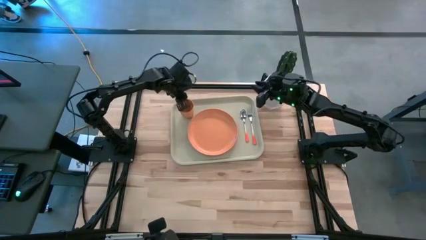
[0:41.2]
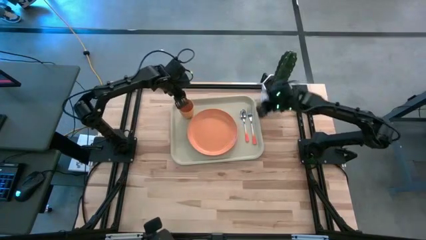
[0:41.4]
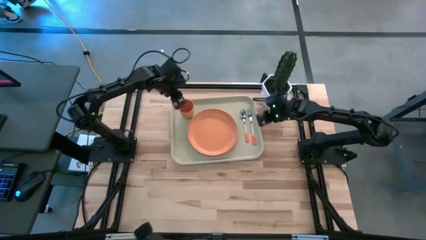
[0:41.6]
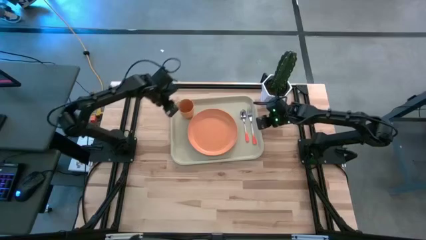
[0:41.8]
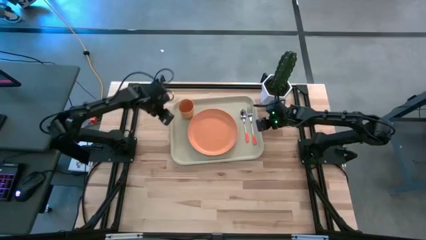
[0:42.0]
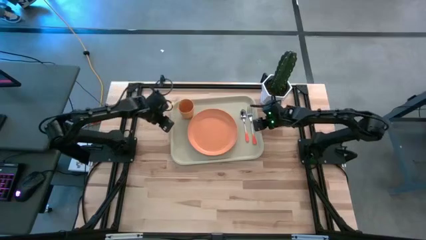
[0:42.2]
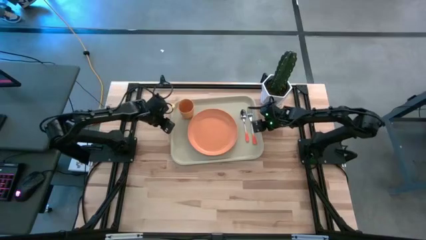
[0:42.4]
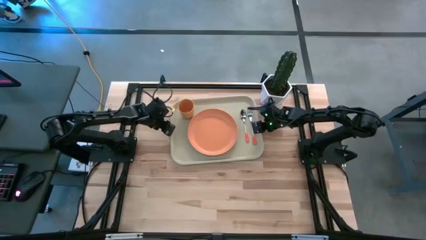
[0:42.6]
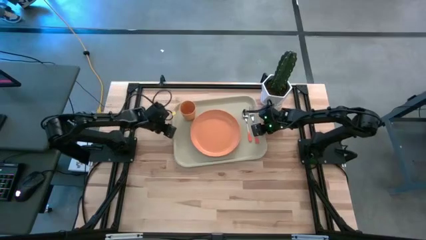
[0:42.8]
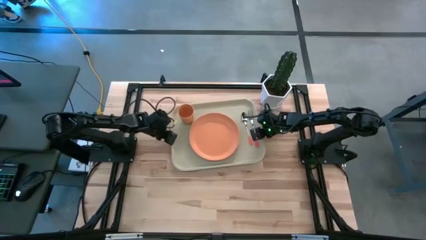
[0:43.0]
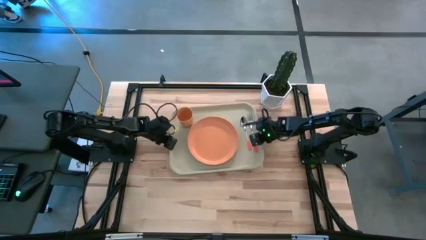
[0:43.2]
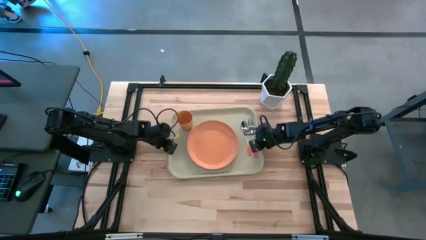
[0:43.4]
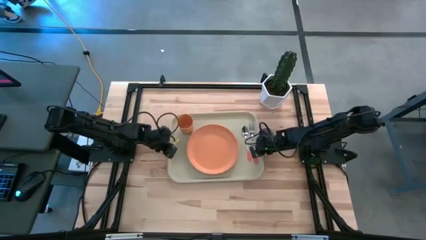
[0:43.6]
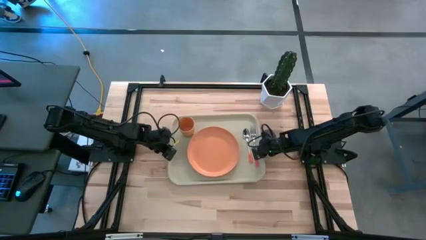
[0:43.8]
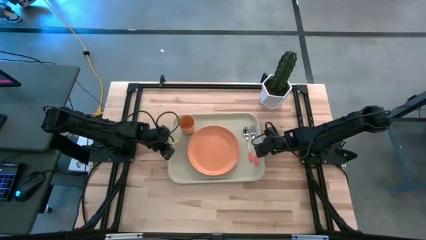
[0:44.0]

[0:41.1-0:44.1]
Task: Pick and place plate/cup/fork/spoon on tray
Adjust the gray tray to the center

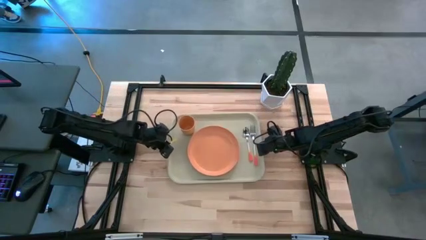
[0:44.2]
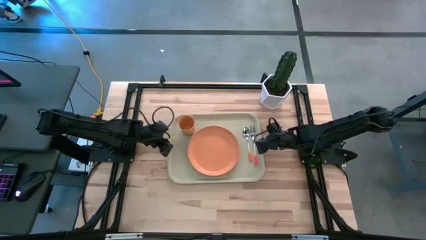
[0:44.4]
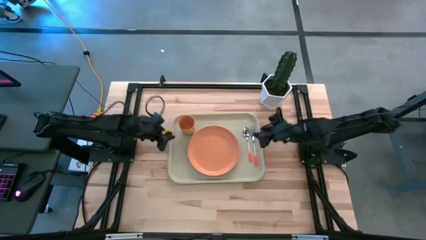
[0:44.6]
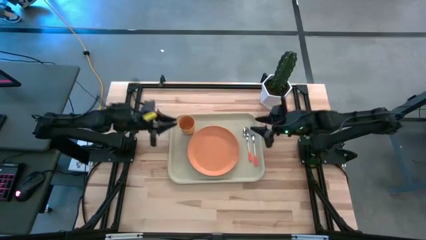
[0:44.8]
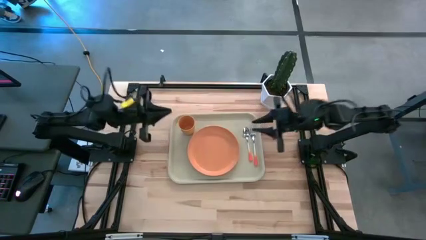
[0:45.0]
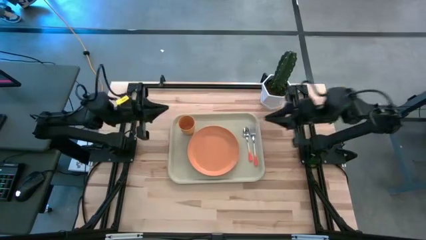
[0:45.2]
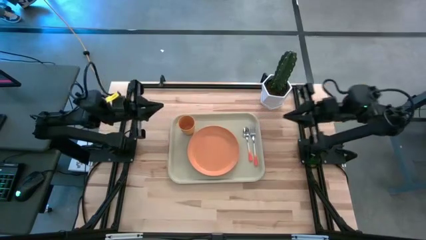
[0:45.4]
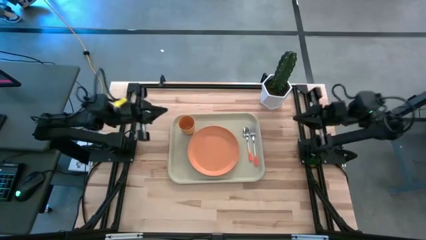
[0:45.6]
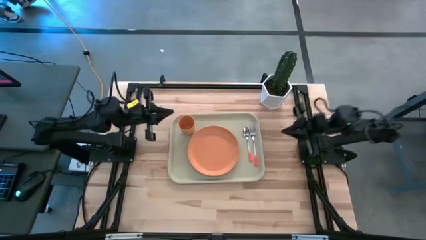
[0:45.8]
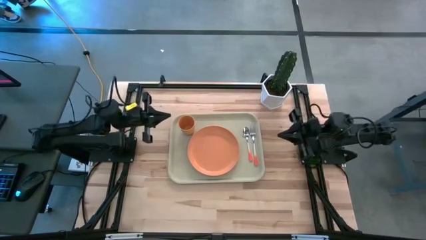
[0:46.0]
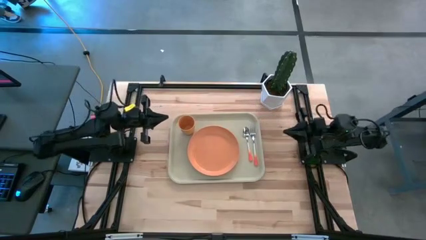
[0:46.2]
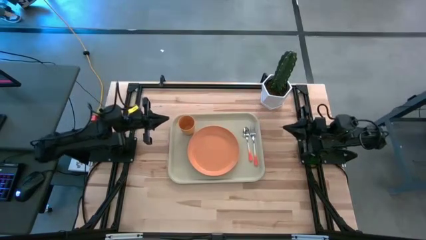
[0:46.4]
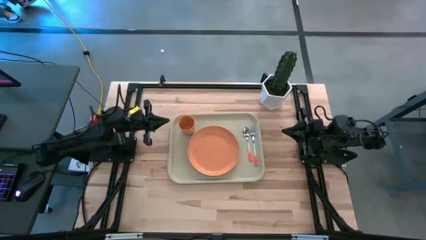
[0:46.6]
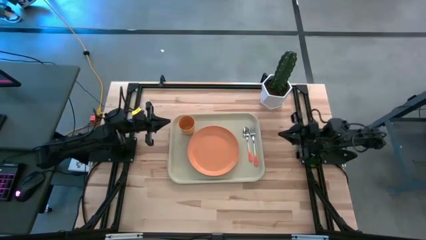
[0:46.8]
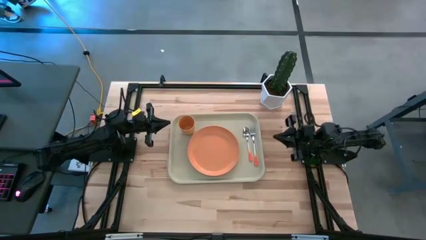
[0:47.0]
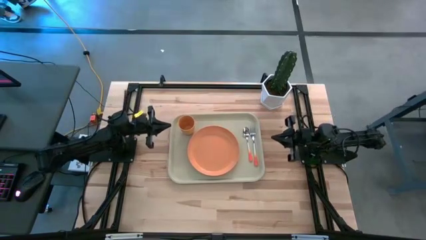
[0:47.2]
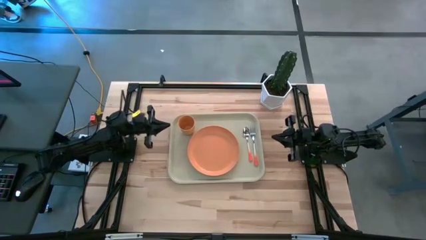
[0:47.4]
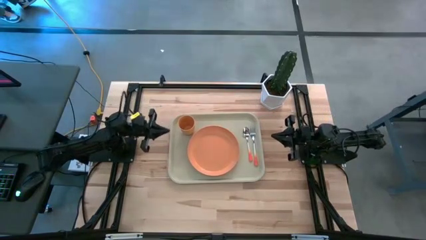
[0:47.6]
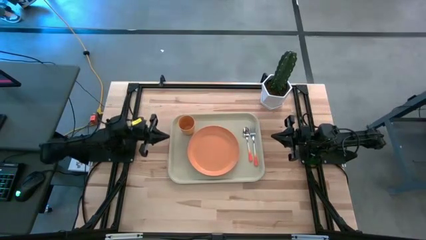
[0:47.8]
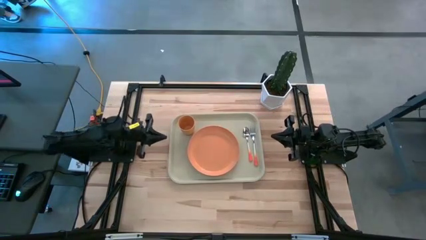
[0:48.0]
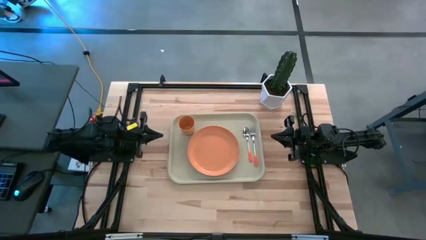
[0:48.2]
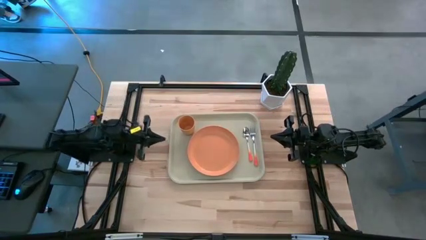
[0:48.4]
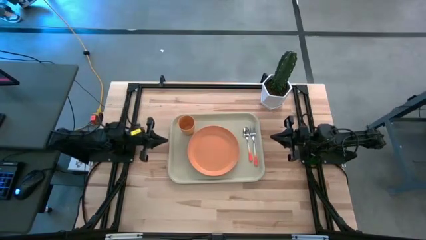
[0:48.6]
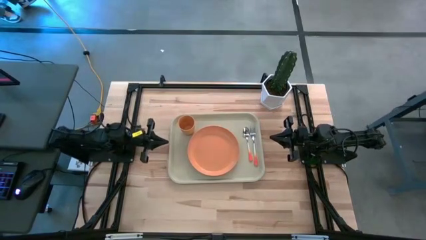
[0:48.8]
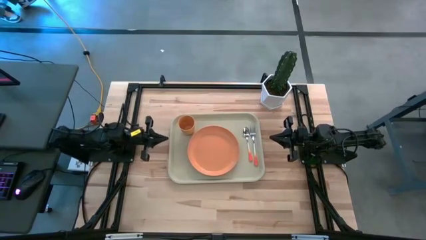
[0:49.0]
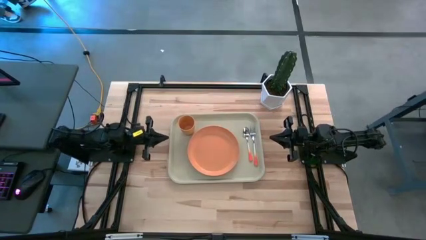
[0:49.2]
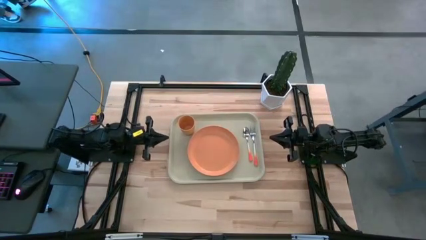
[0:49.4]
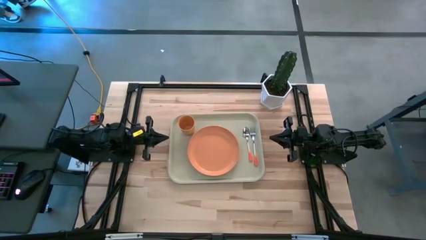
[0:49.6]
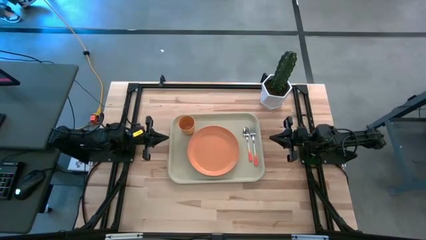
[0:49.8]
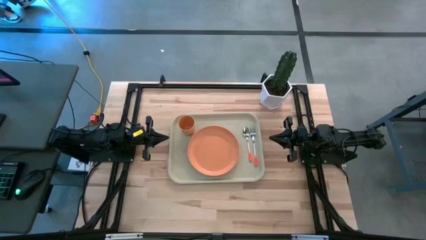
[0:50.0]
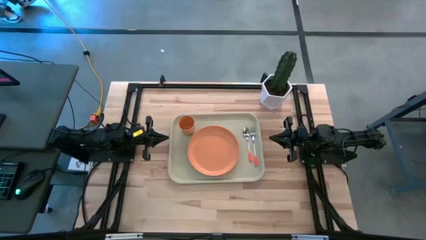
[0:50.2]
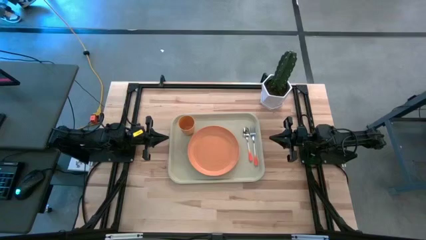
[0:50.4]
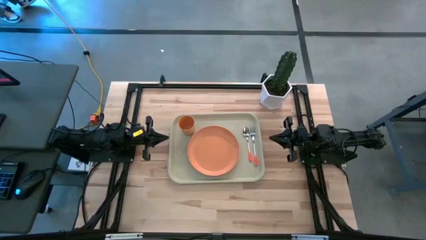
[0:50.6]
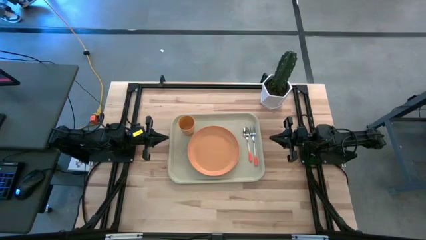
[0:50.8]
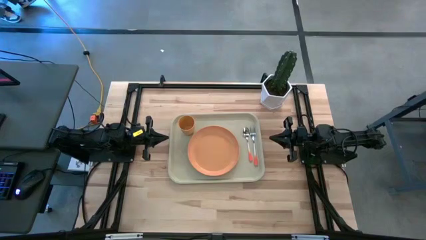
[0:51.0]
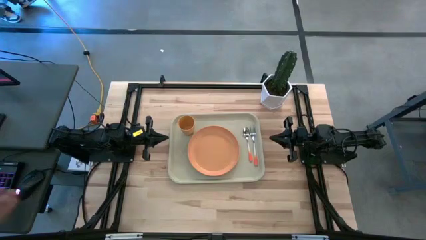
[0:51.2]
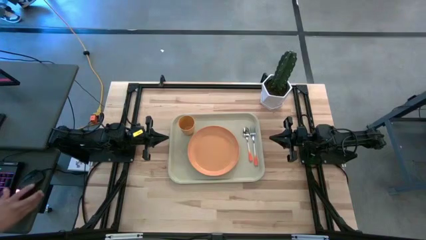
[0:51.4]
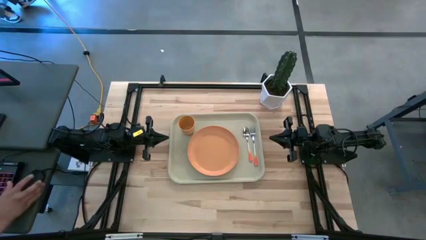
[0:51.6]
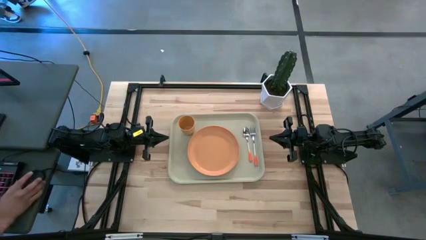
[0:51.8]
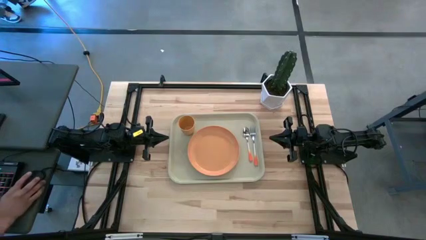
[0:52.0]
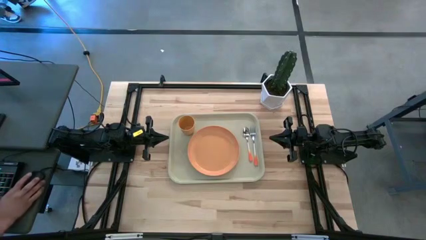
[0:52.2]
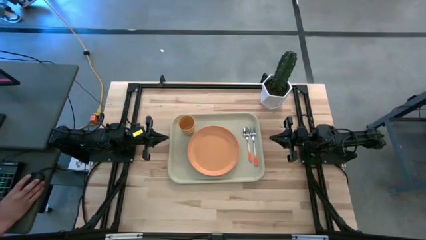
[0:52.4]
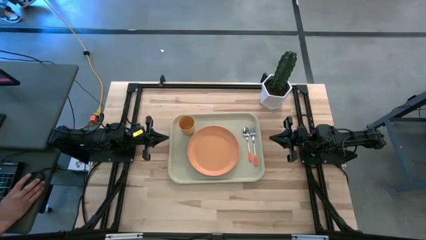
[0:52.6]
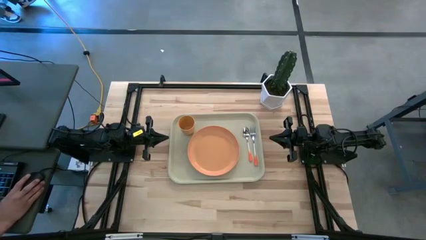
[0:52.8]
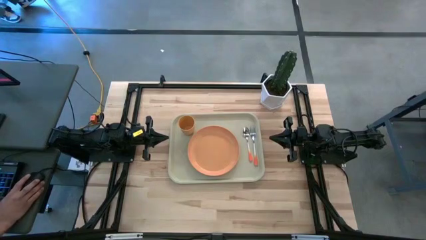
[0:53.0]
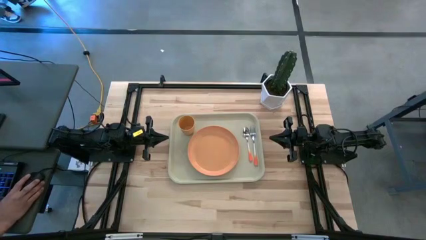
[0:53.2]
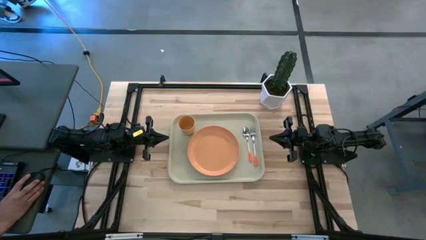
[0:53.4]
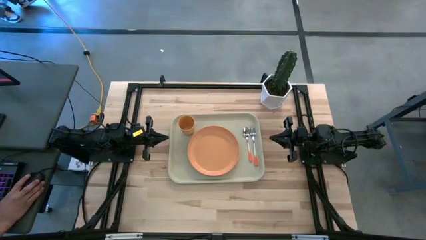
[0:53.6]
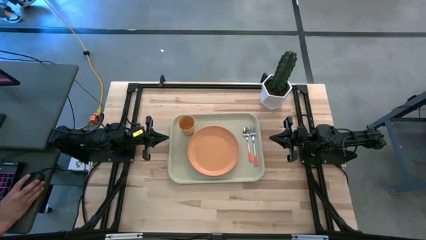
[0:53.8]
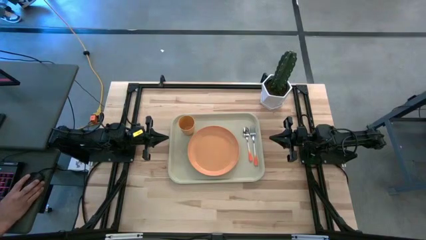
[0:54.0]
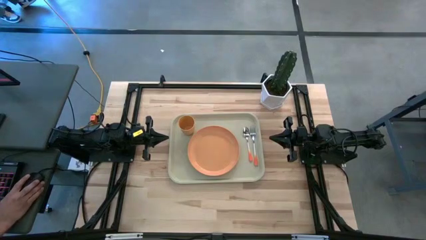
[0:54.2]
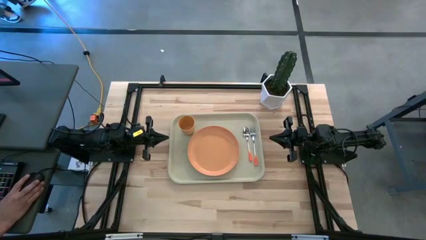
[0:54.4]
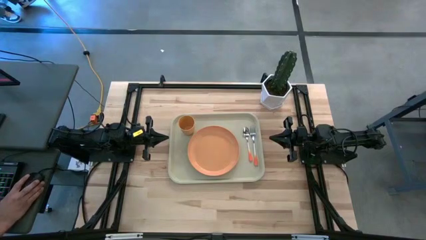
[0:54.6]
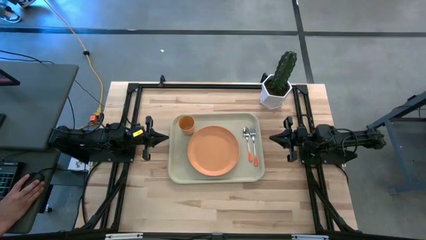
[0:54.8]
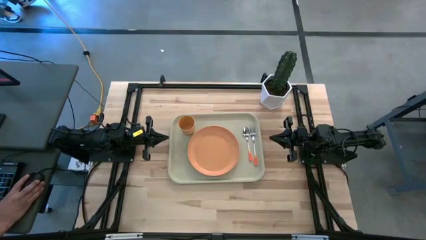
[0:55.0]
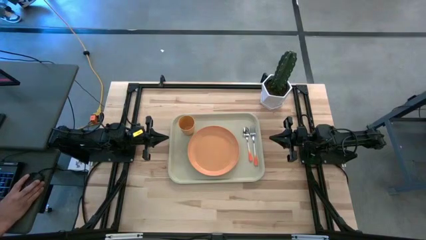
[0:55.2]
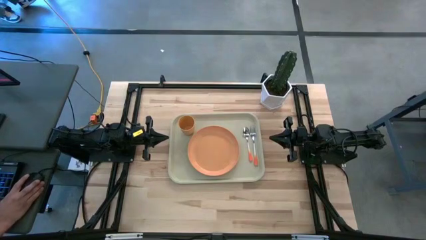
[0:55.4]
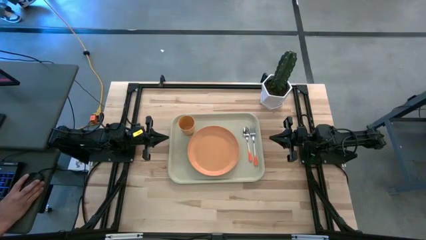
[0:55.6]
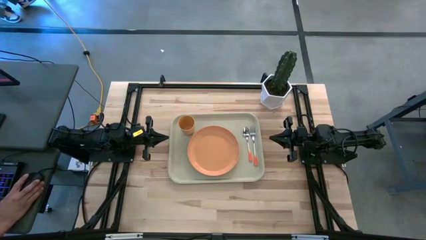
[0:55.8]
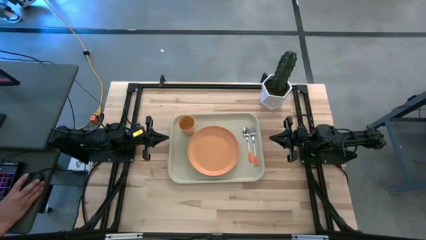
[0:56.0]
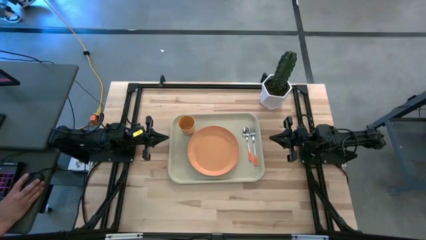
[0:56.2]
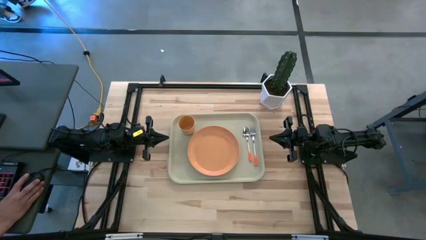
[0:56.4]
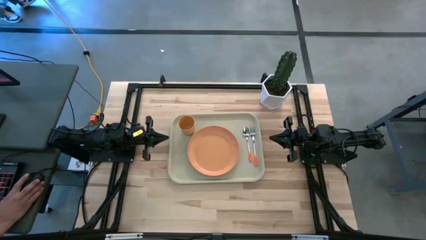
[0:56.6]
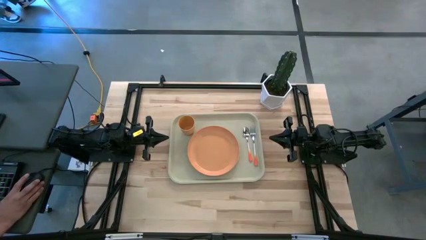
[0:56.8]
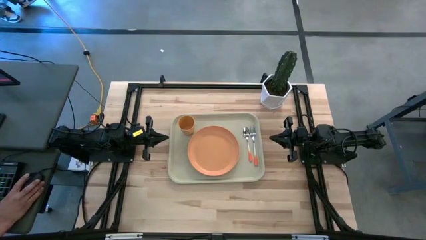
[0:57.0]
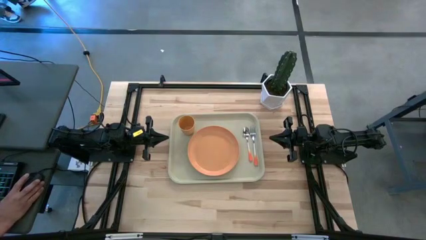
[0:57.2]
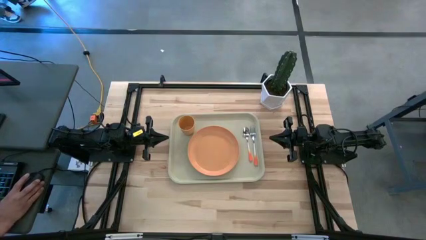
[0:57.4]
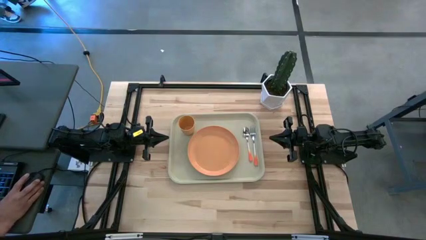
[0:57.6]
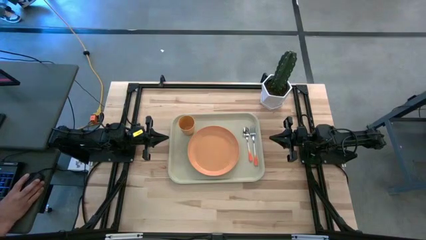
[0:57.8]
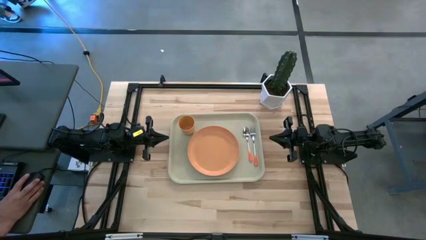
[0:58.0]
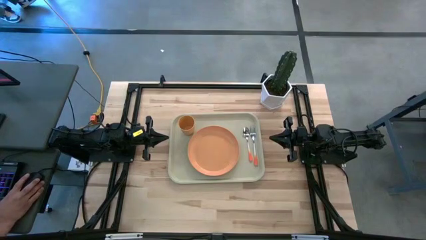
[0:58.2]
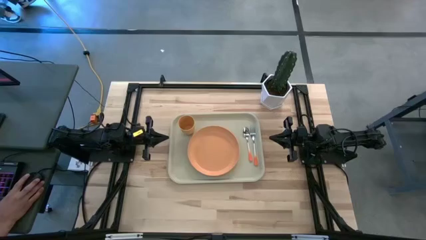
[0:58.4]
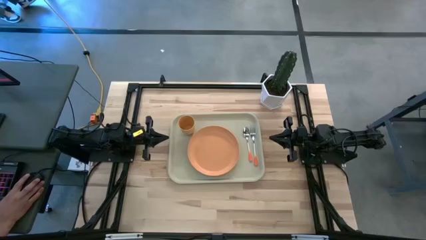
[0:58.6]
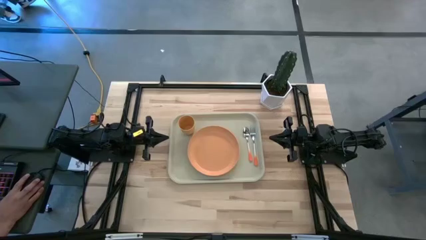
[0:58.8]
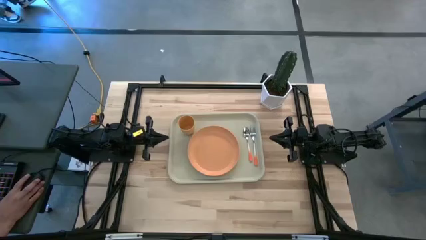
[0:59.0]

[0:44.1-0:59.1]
Return to Home Position
